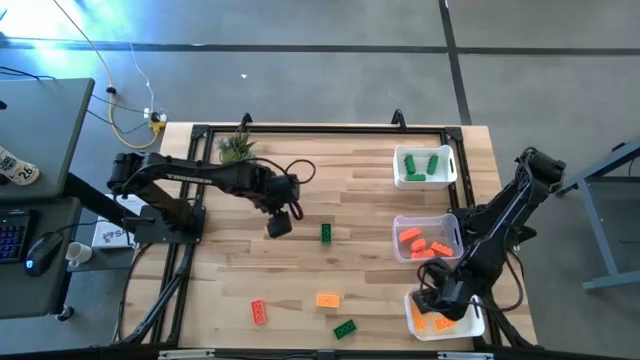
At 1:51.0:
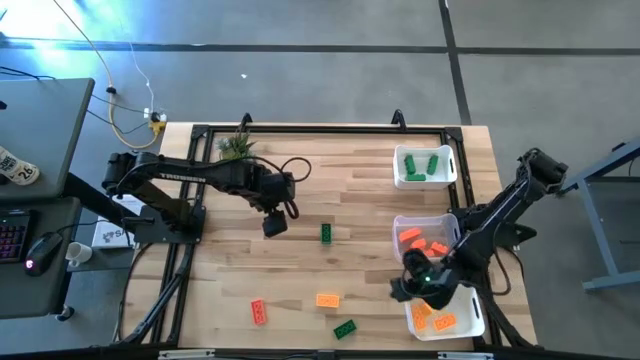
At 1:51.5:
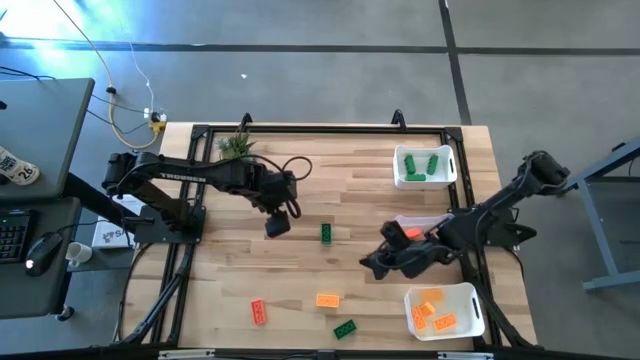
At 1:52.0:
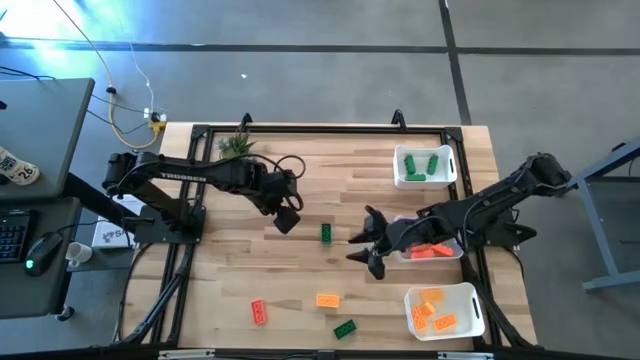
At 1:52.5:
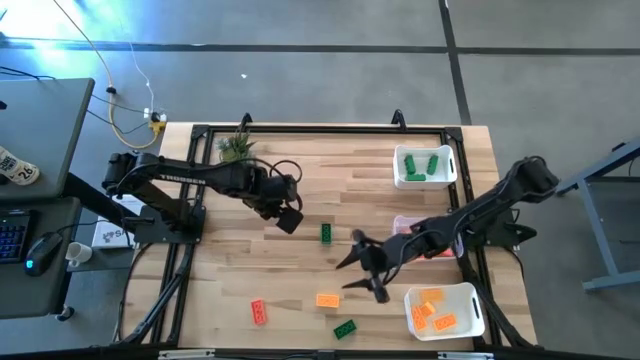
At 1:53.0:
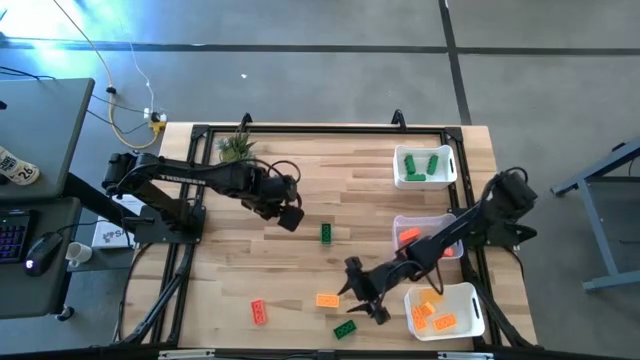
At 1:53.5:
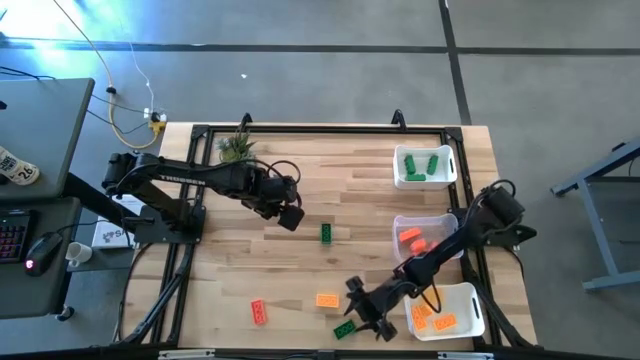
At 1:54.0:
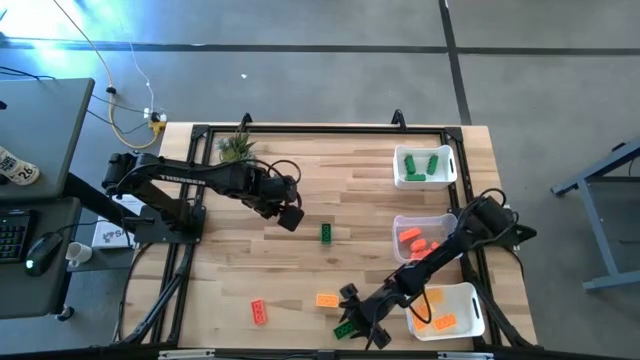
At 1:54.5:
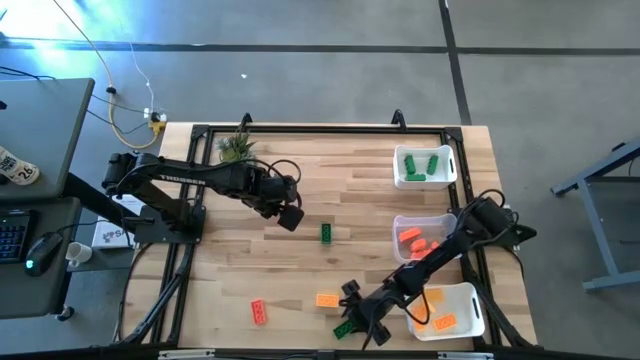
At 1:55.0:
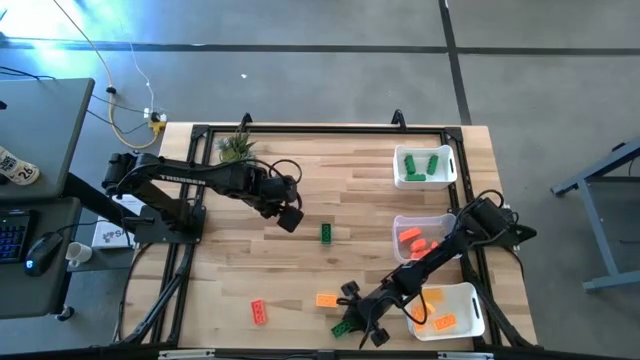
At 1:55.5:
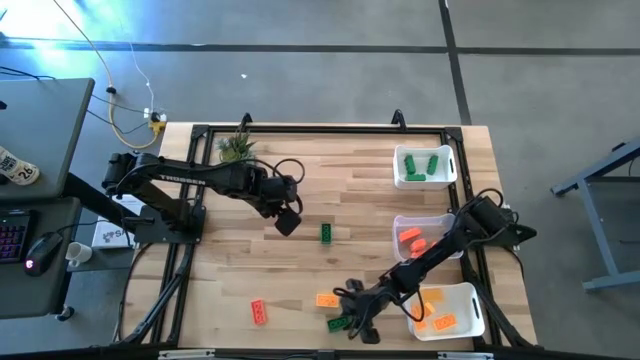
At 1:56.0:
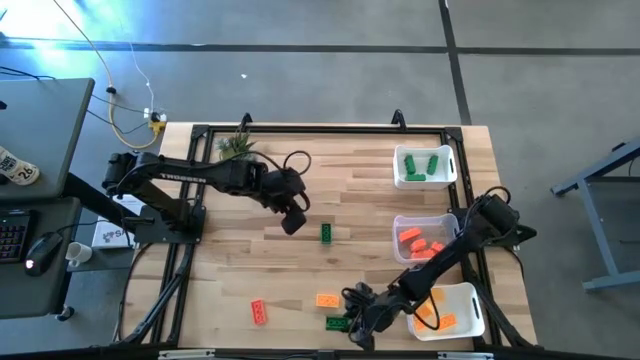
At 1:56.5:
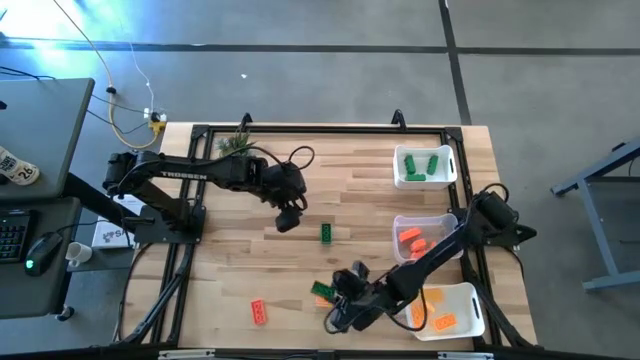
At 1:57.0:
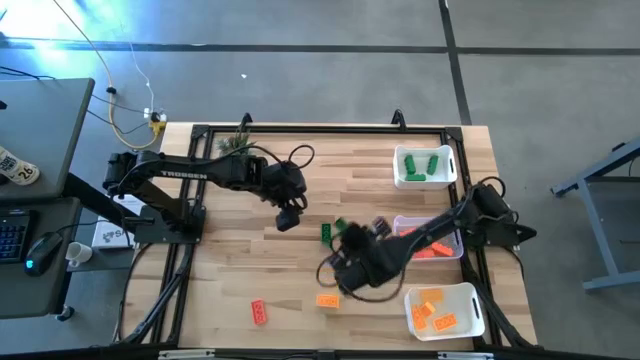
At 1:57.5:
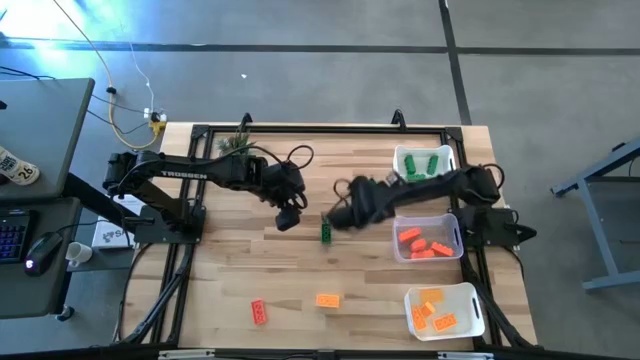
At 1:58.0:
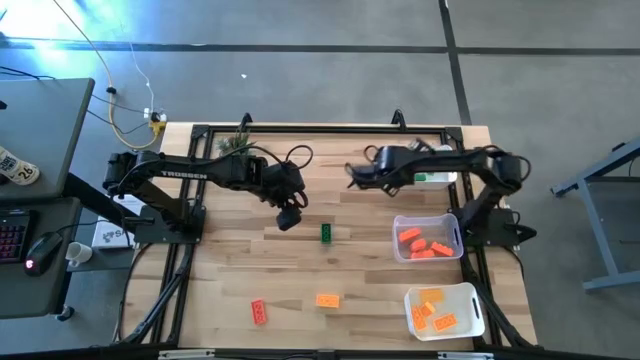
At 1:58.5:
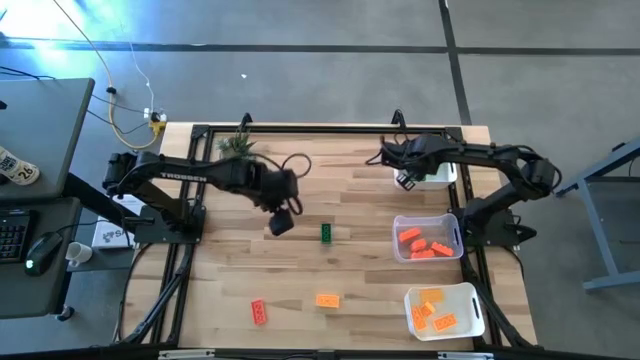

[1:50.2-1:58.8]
Task: Sort & place blocks by color
Put the green game piece into the top white bin

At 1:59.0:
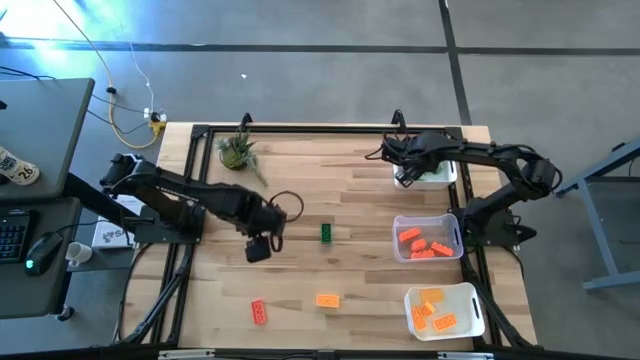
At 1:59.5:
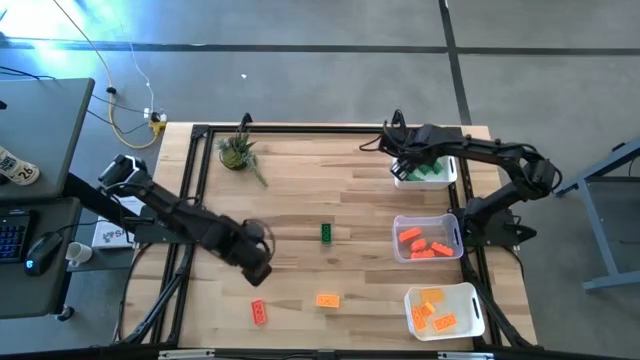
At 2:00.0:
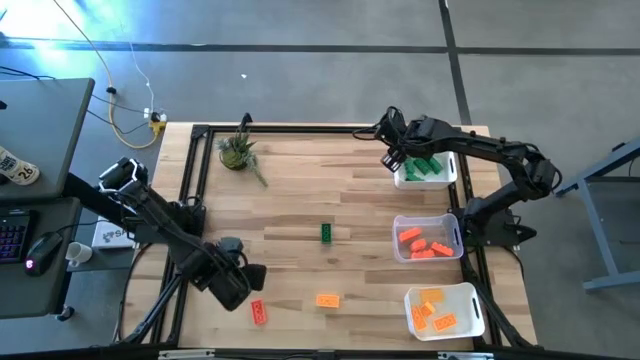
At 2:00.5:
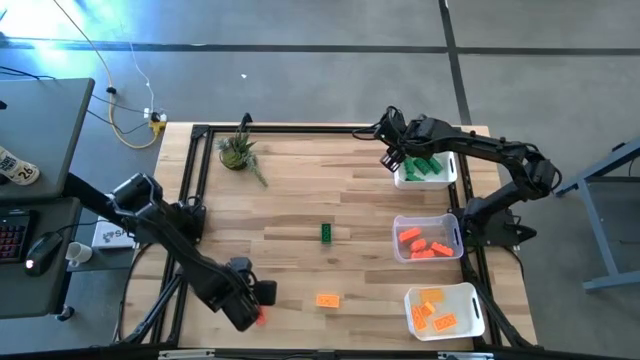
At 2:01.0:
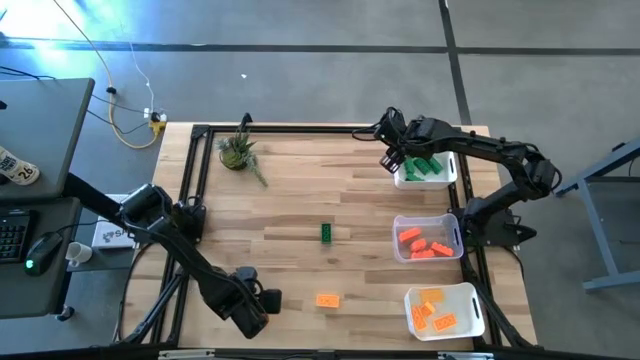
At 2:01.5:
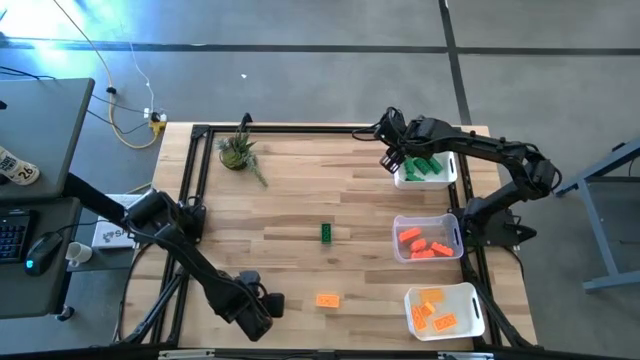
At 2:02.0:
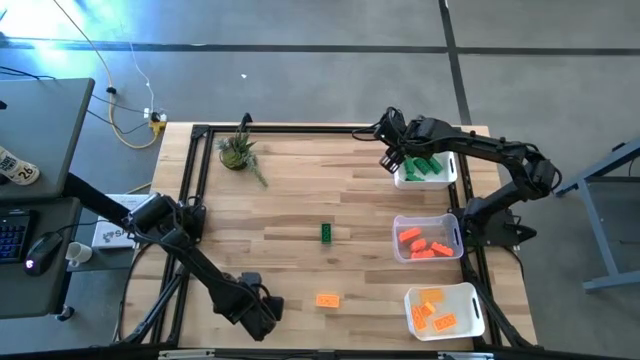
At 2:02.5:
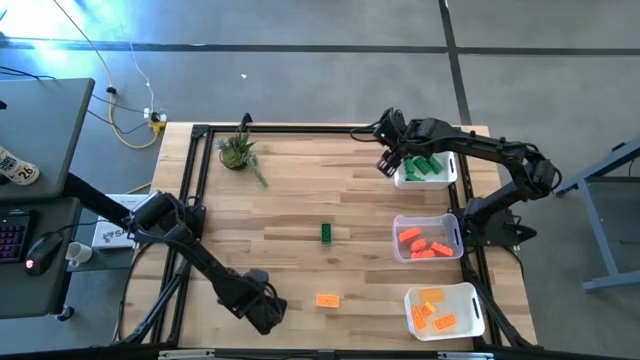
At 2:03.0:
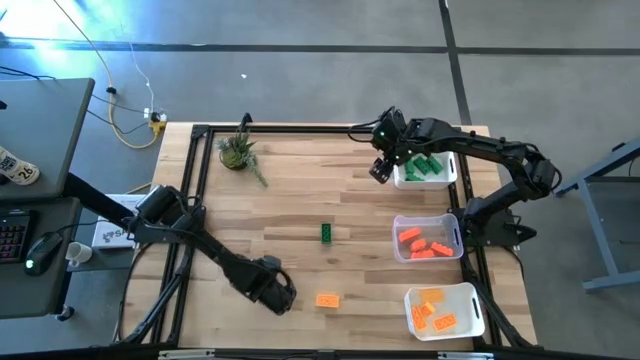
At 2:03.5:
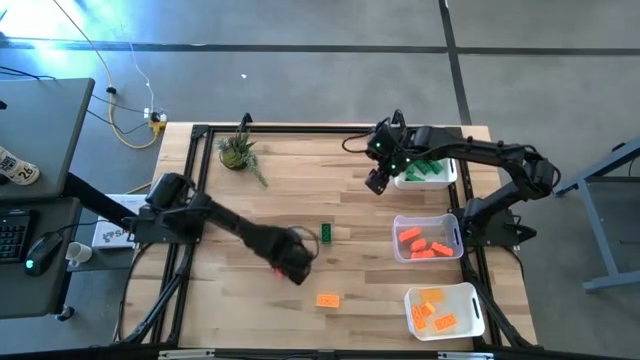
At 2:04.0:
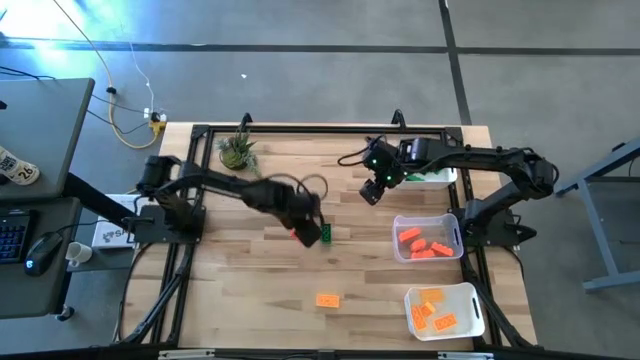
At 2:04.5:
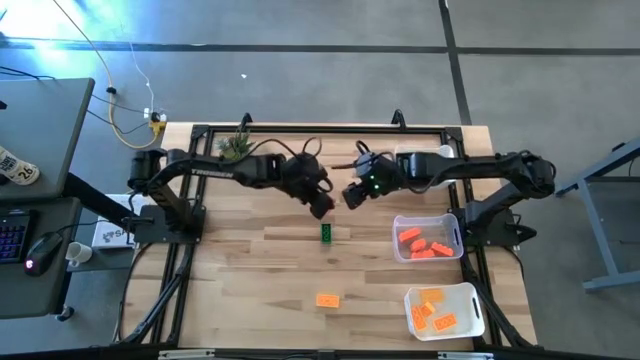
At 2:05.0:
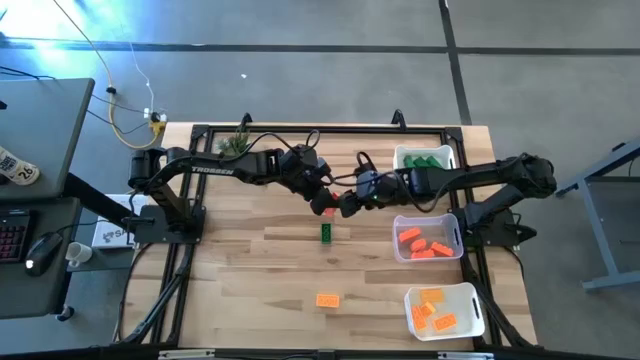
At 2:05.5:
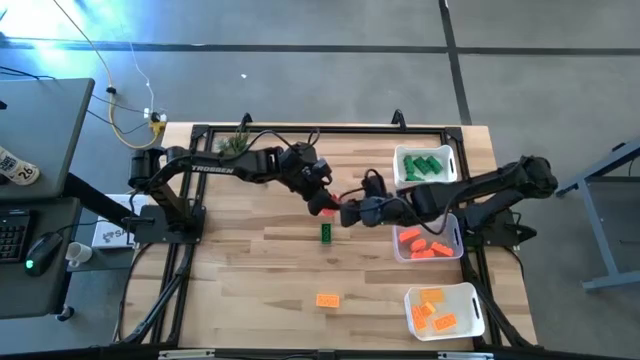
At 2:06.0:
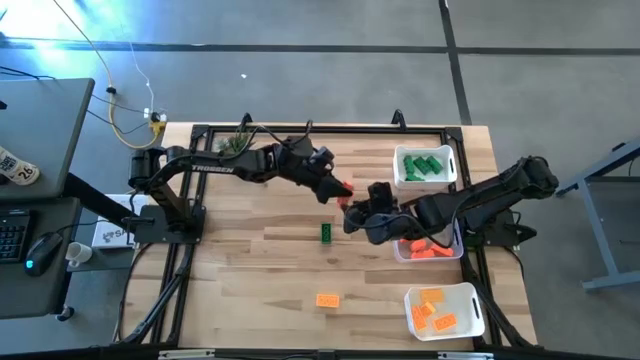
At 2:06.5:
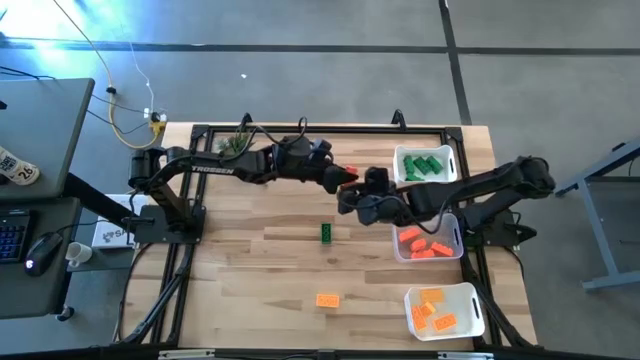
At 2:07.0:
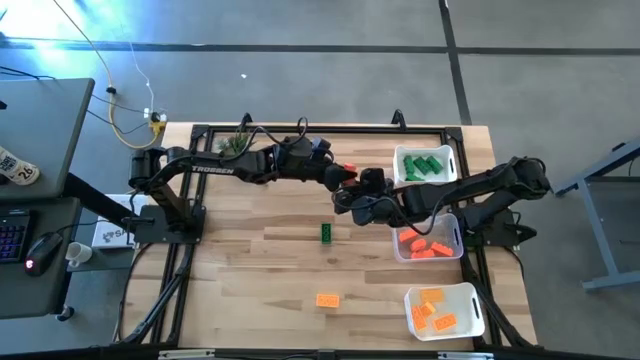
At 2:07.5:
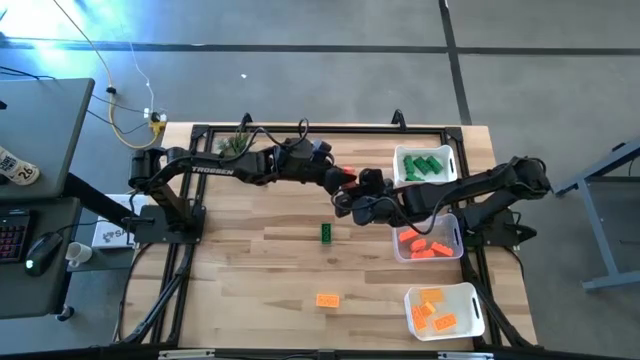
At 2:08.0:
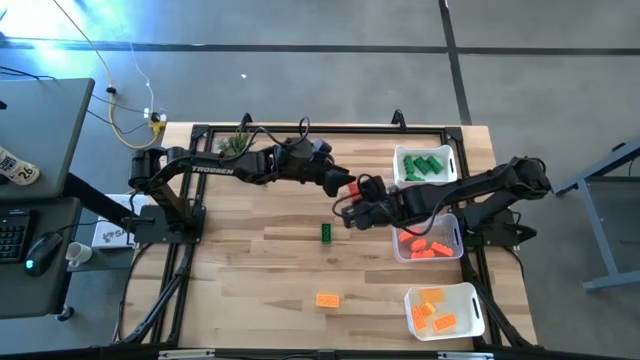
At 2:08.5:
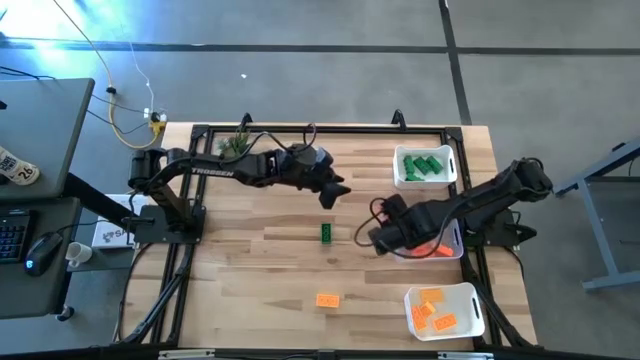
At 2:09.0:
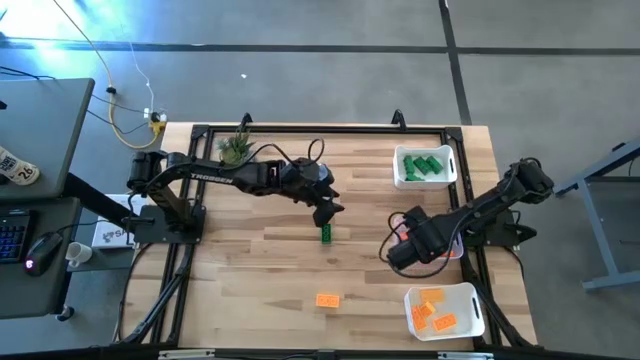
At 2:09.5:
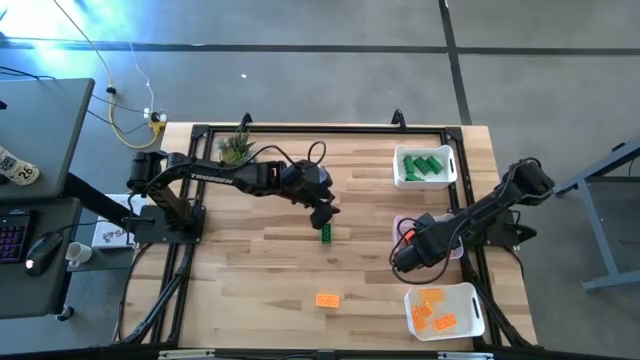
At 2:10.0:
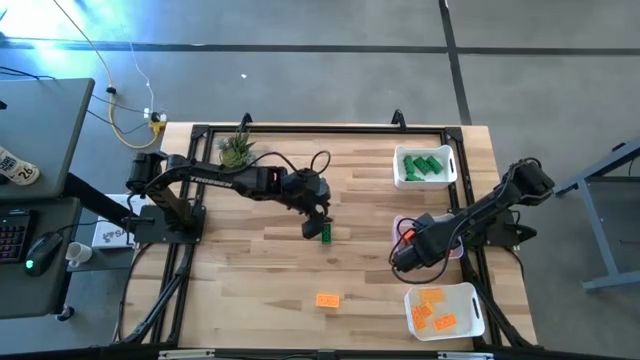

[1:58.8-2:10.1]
Put the orange game piece into the transparent bin

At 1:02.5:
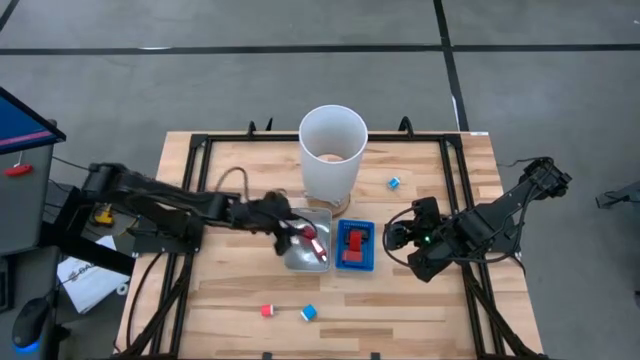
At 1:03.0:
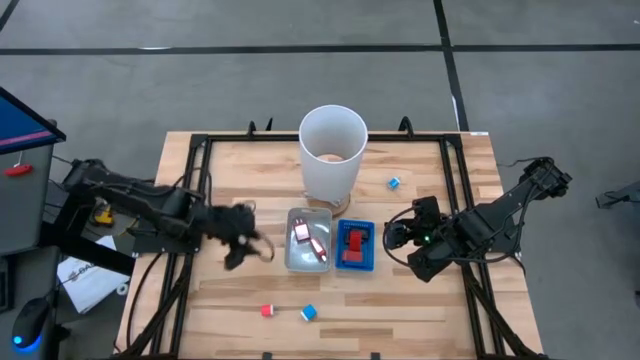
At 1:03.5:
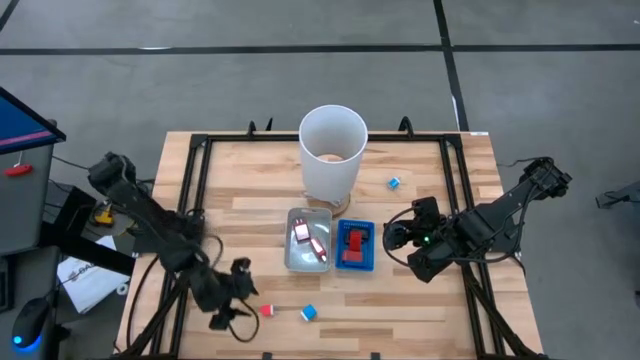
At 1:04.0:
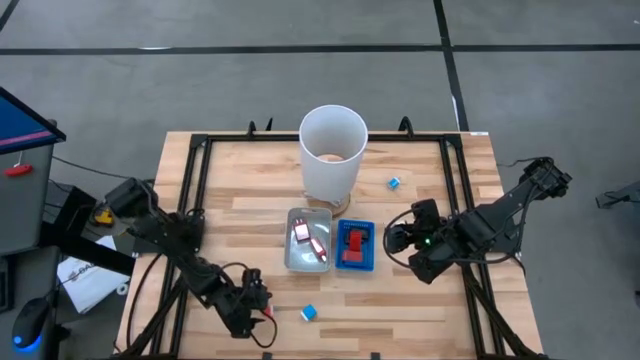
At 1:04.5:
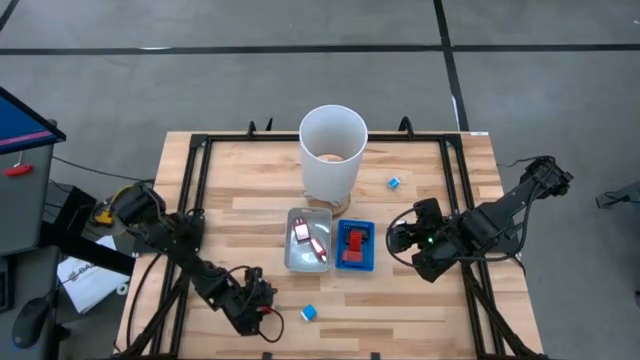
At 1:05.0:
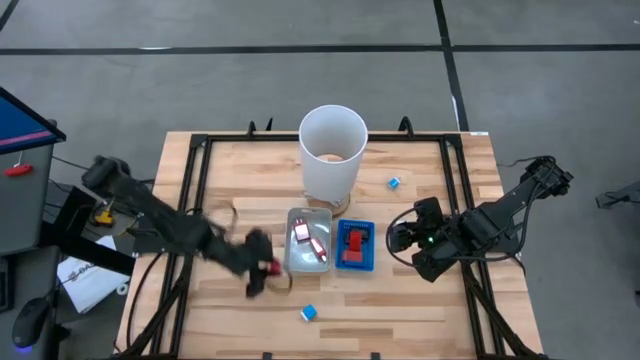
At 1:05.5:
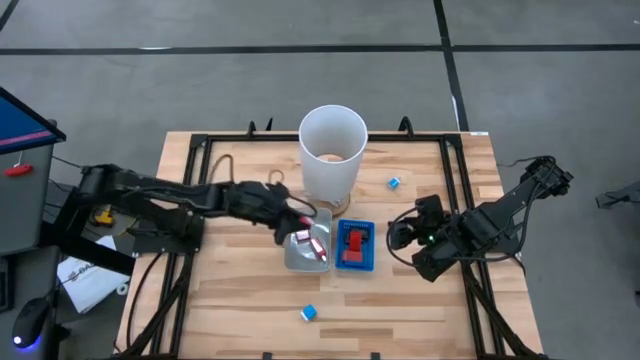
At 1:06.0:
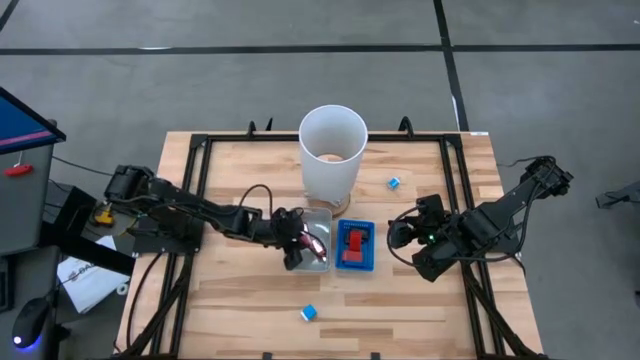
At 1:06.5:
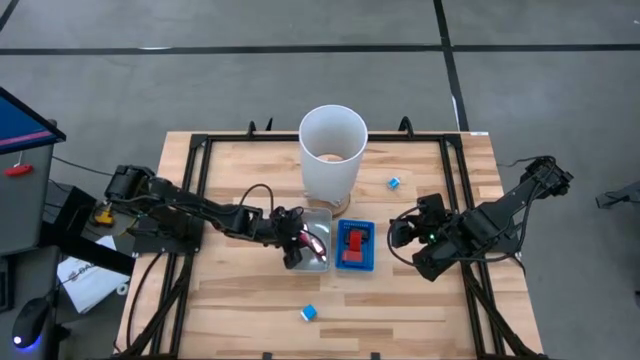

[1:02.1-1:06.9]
Task: Pick & Place Office items
Put the pink charger adapter into the gray bin
